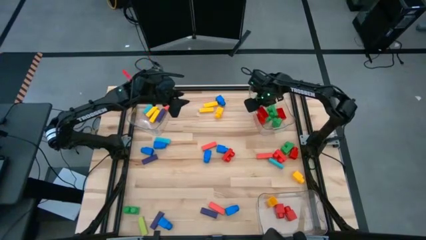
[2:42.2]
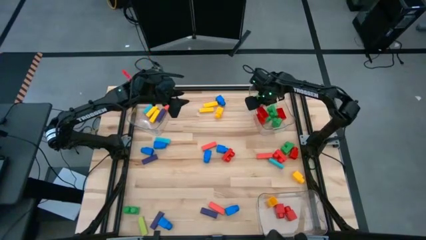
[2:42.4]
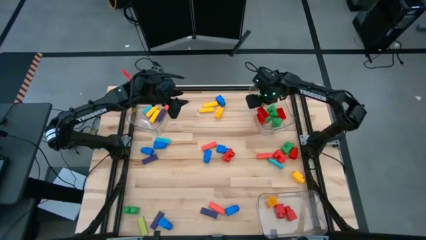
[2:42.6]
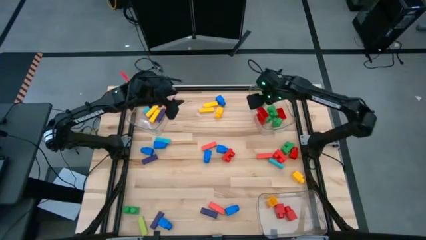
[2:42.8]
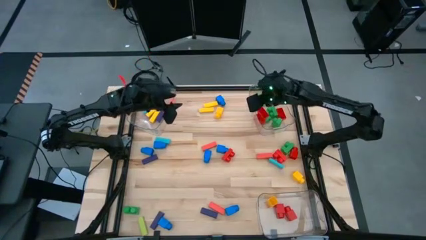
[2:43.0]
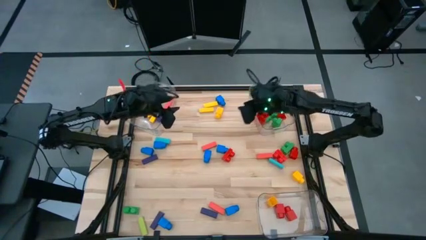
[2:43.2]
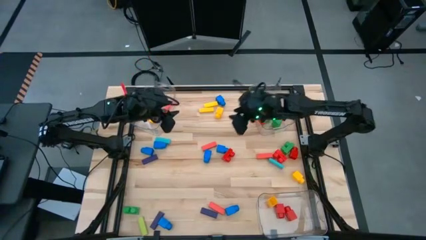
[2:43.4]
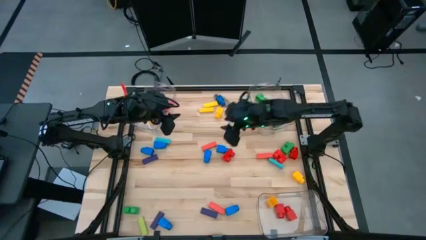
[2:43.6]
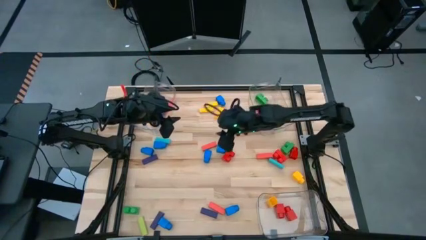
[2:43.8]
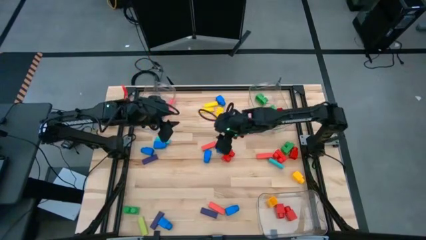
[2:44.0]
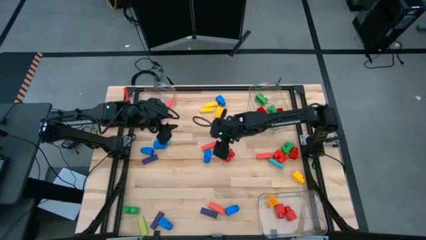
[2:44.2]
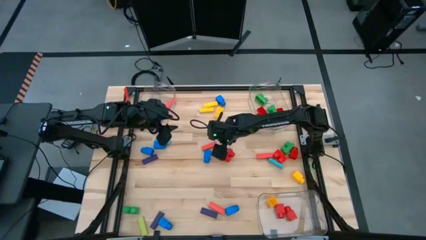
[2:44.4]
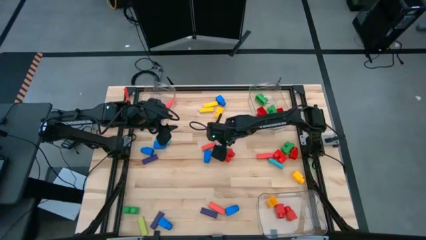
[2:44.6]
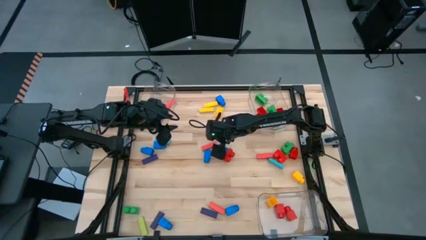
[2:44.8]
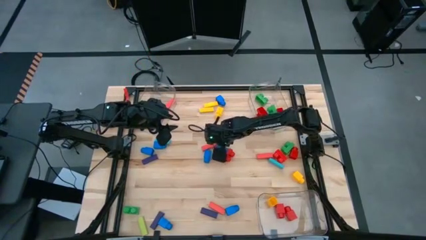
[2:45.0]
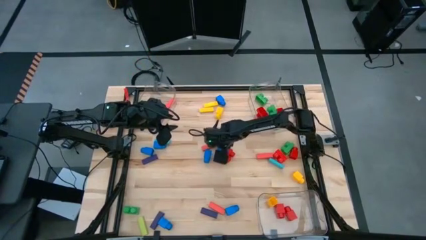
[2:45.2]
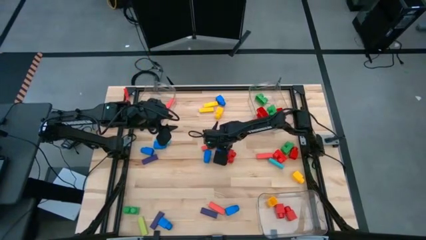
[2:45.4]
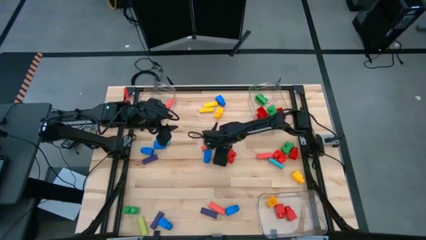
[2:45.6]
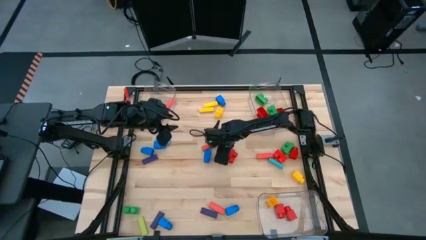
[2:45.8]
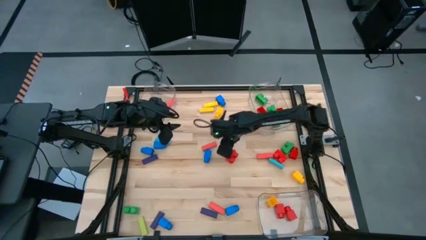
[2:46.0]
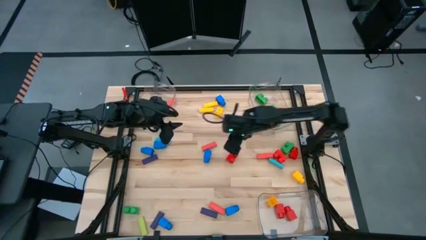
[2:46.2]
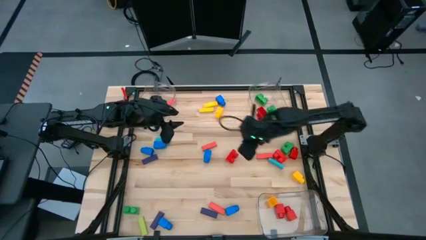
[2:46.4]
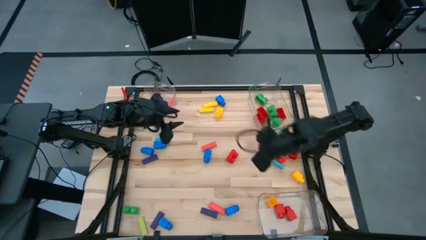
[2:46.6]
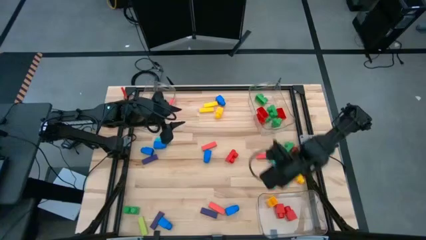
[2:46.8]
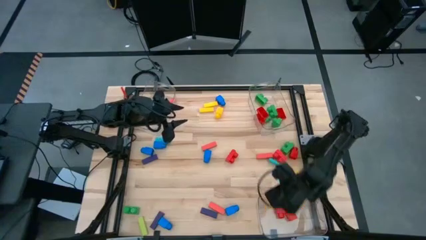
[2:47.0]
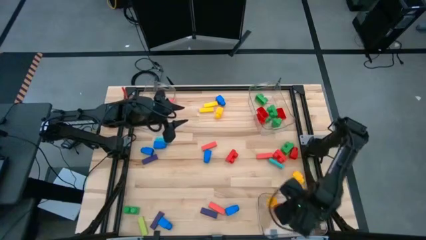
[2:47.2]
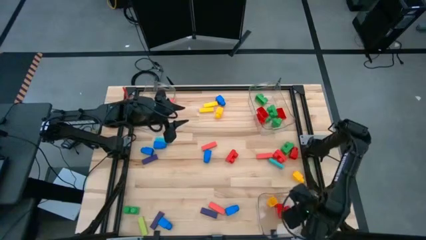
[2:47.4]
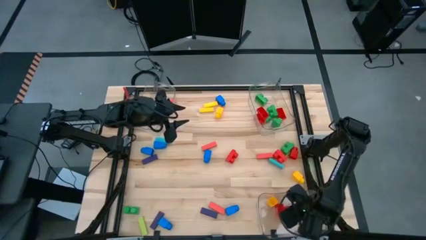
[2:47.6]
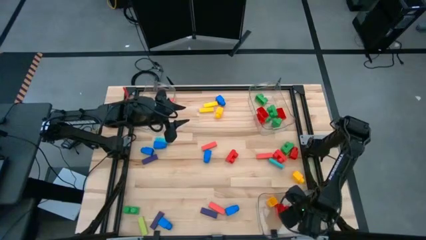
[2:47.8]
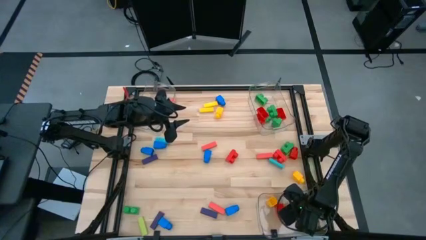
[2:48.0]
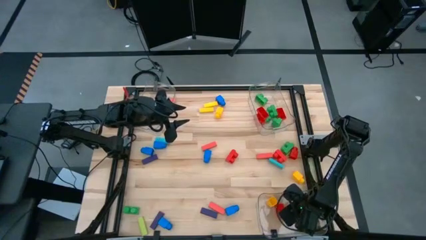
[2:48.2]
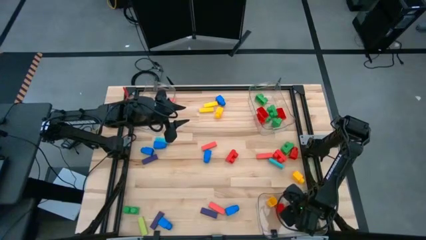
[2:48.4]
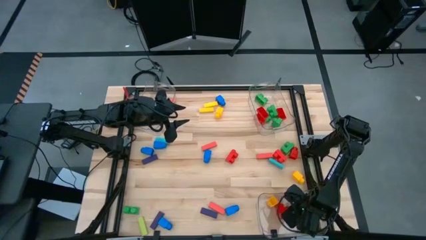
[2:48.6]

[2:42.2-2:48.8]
Task: Sort blocks by size
Put the blue 1 stud game piece into the bottom transparent bin

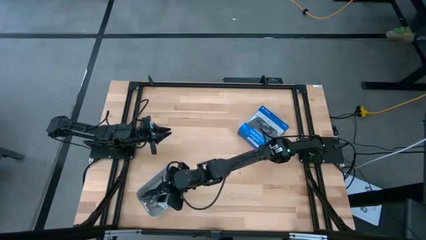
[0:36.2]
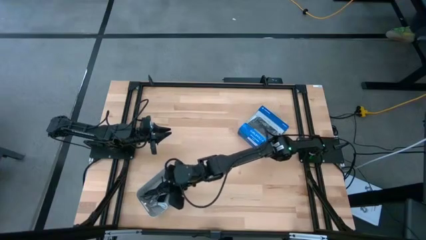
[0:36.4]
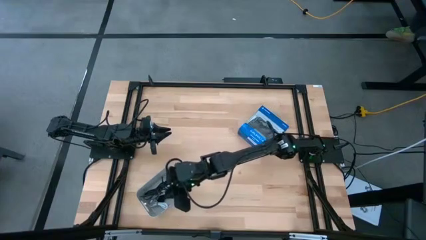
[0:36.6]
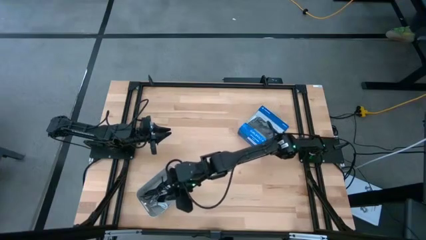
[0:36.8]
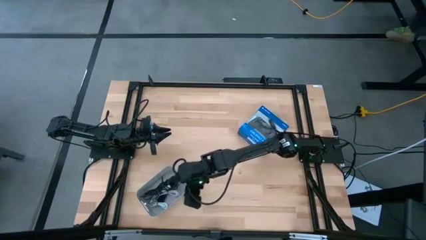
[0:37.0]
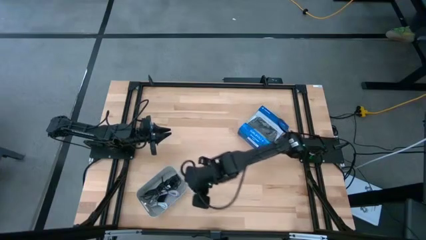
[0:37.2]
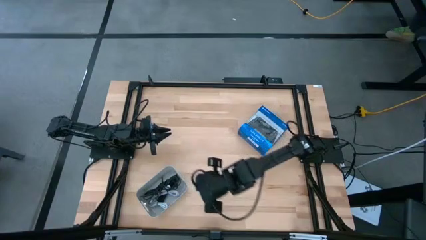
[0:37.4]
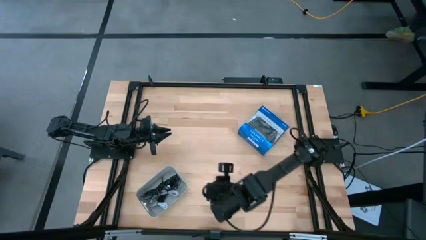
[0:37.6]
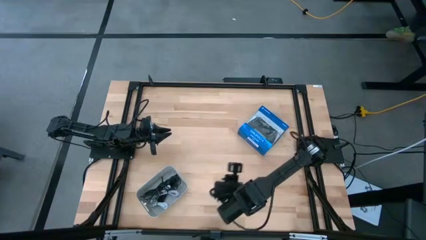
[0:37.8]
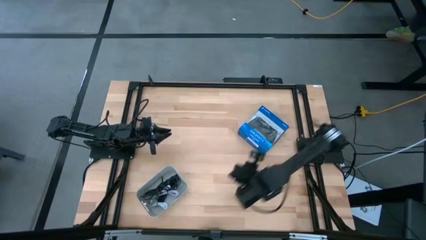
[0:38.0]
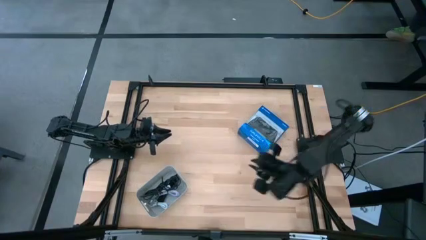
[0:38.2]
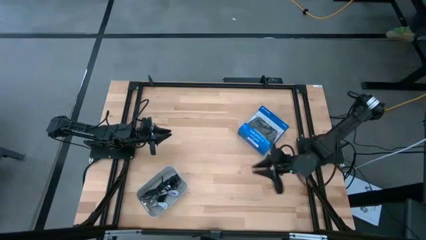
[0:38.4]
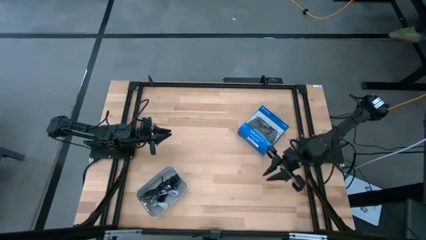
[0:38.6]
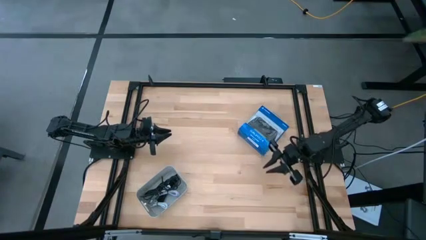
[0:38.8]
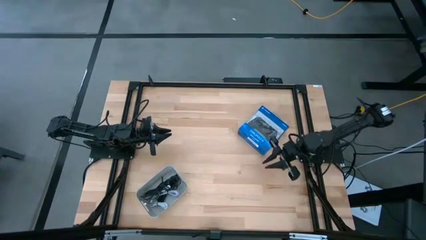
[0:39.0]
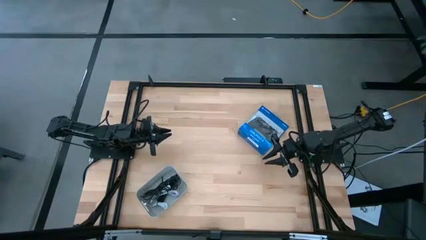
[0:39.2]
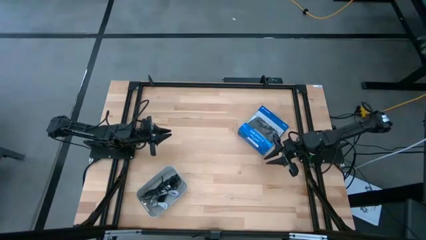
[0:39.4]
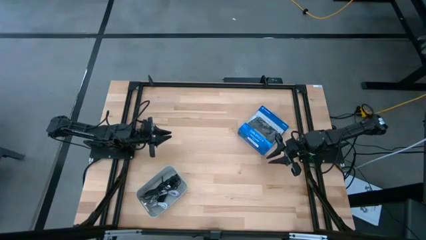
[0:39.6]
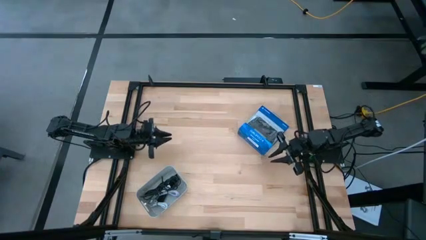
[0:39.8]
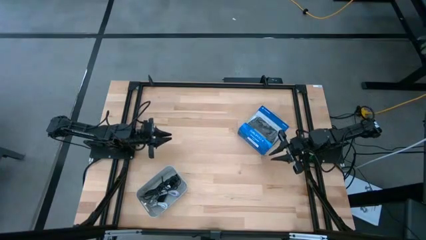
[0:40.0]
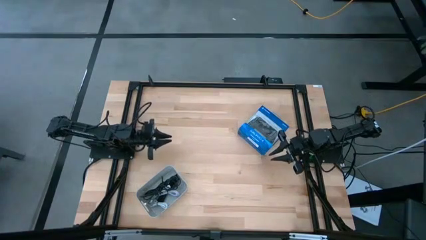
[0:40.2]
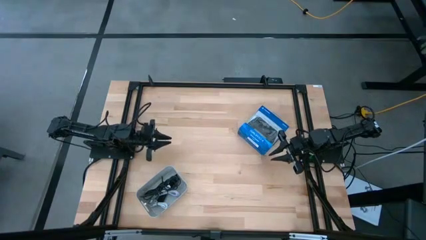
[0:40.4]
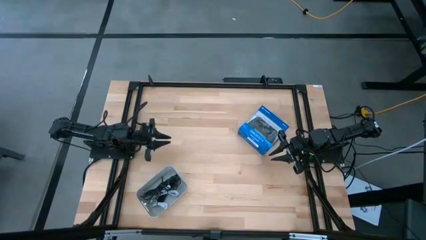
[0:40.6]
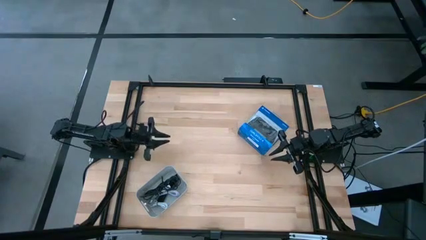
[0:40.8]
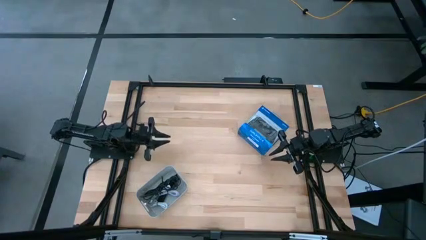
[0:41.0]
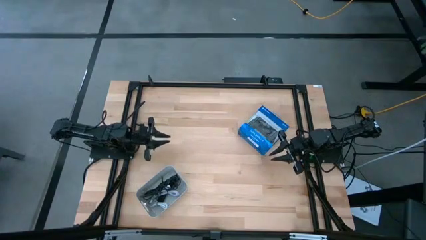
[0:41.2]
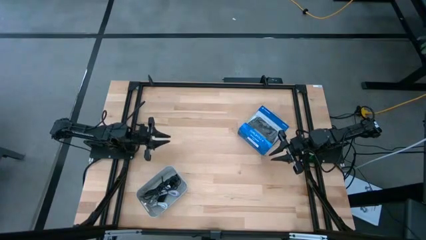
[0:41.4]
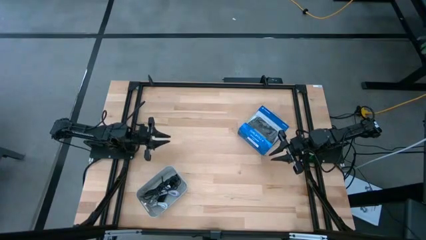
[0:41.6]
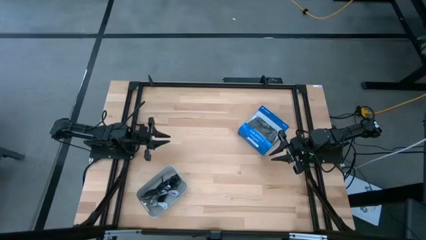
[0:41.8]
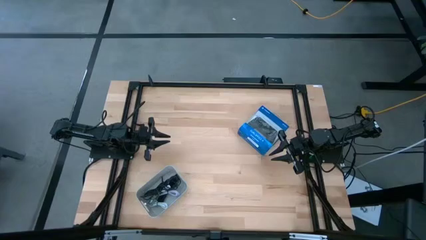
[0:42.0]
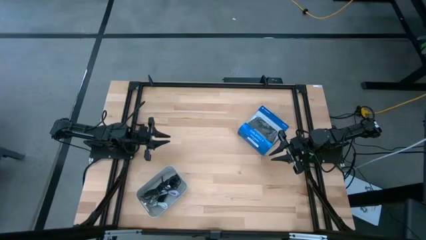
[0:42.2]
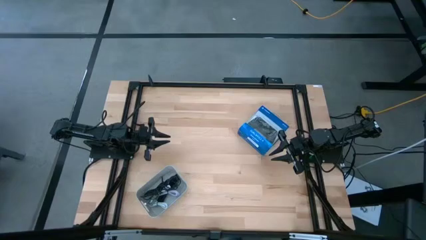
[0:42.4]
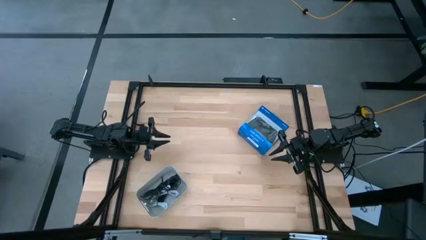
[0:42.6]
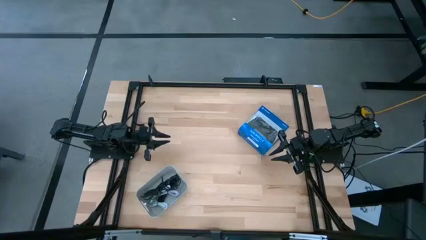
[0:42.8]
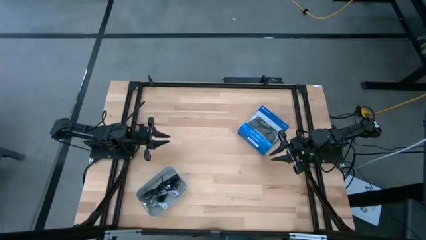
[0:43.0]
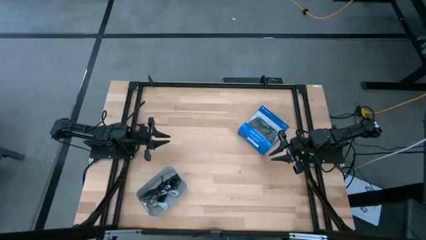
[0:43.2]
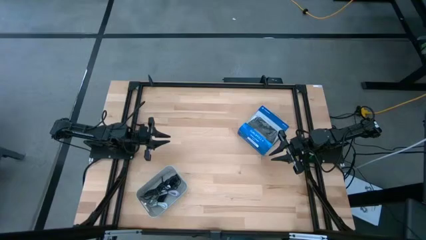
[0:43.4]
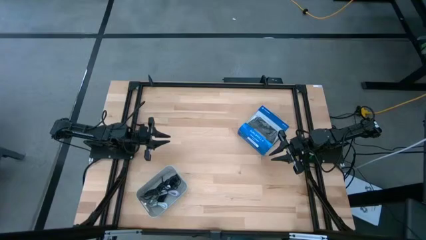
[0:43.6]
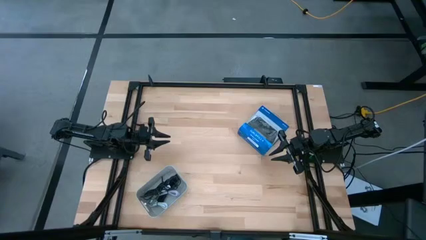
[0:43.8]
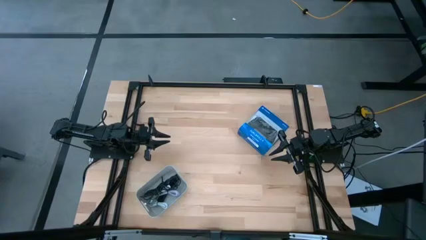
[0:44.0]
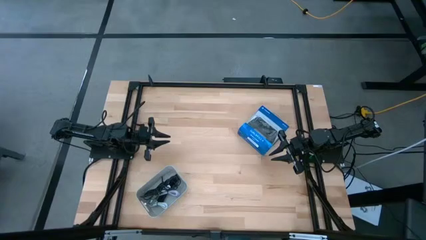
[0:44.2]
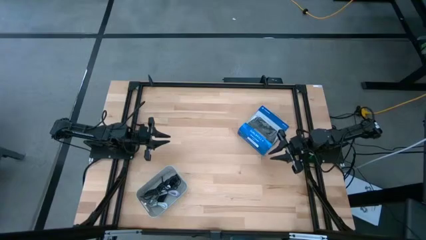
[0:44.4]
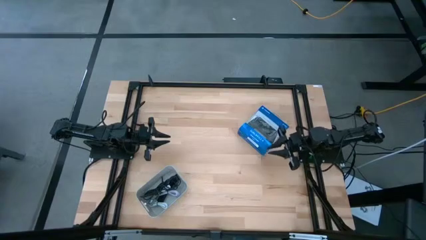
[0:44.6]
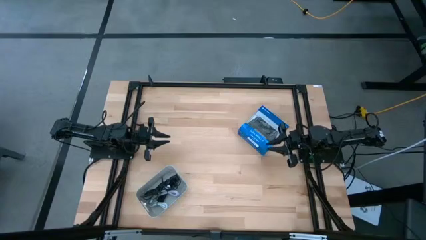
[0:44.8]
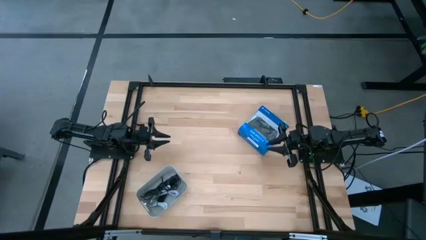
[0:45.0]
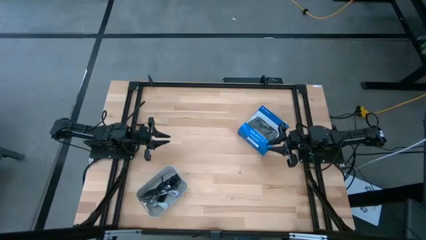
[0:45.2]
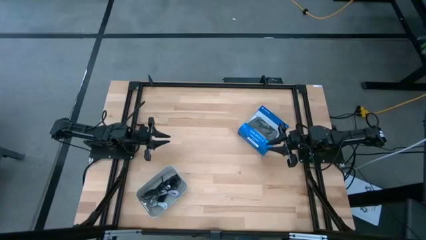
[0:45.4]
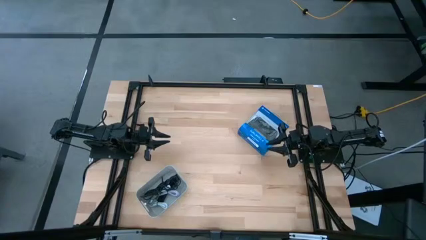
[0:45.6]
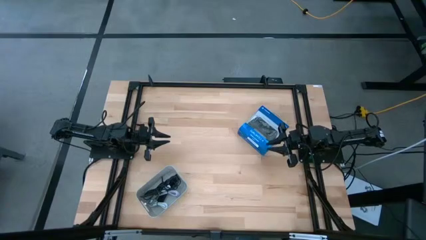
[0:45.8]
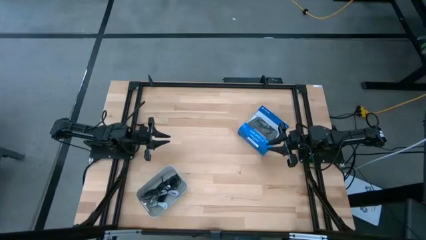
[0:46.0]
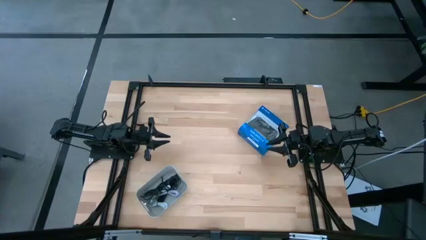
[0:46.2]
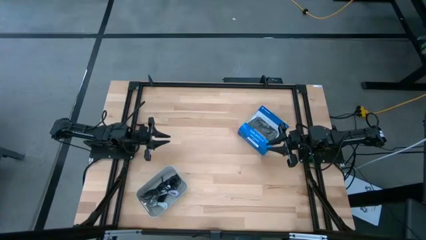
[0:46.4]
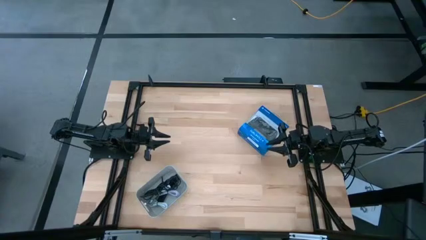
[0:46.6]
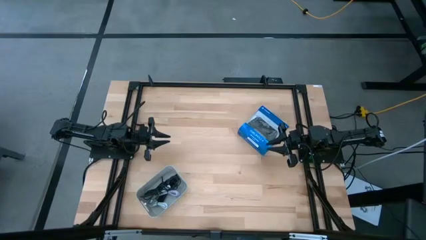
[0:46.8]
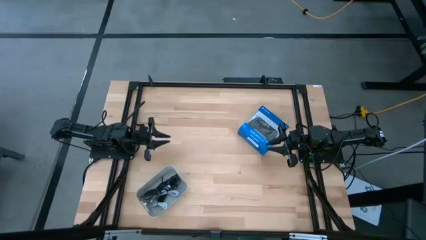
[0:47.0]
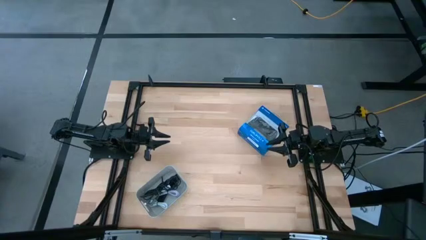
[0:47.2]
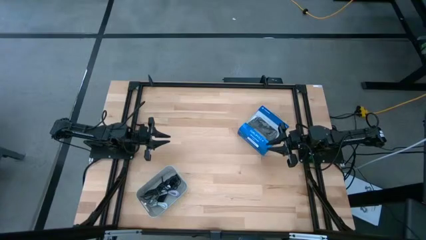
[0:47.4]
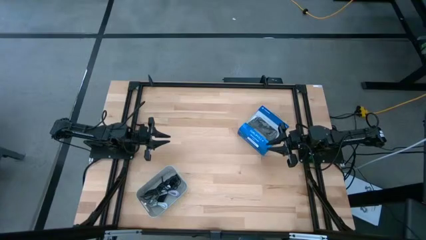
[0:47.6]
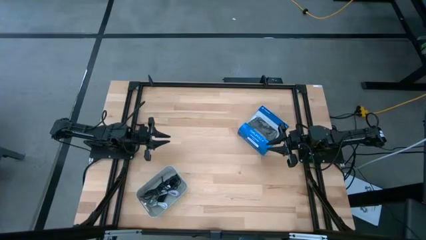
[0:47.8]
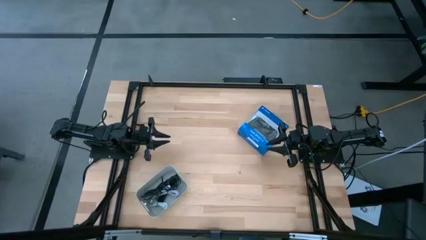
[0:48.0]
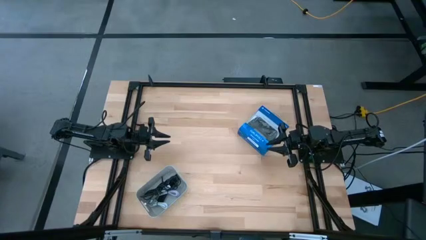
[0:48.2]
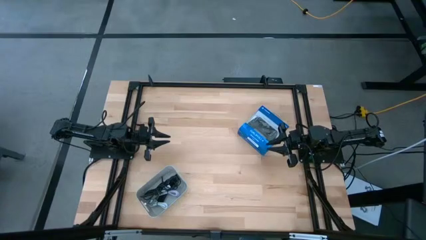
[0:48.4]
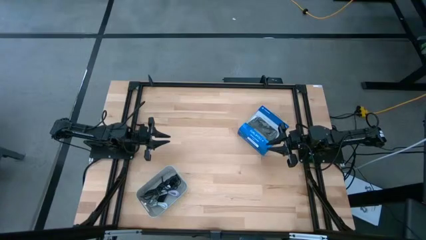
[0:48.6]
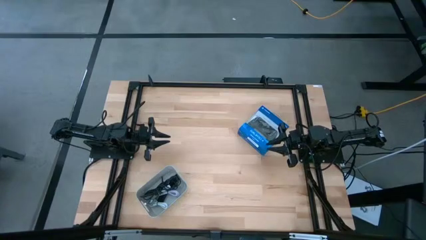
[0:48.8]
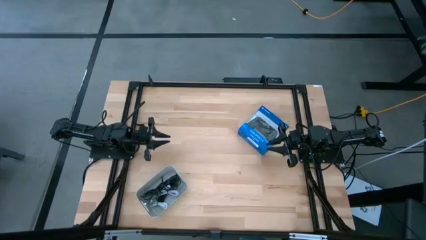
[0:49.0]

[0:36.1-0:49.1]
Task: Pick and place USB-C Cables
Return to Home Position
